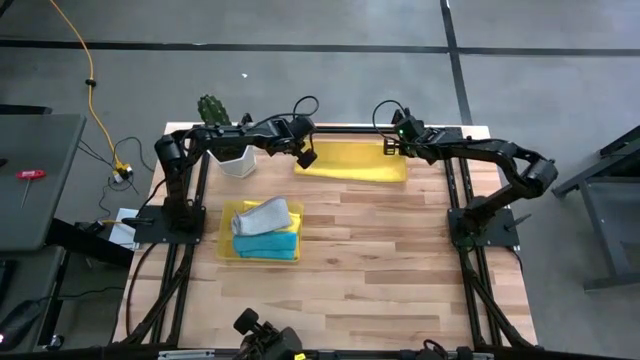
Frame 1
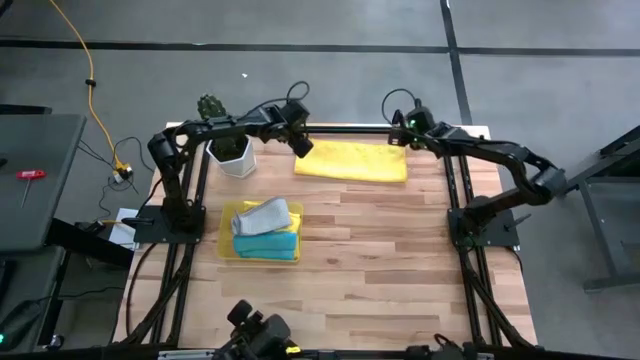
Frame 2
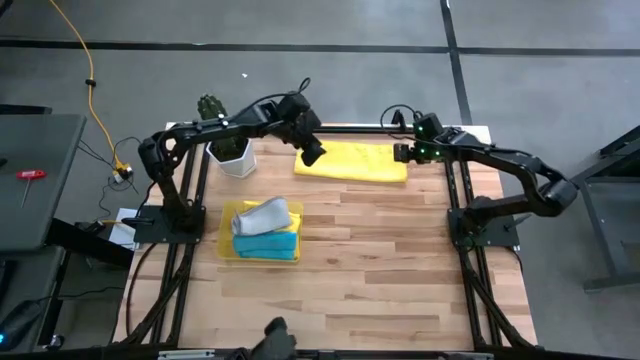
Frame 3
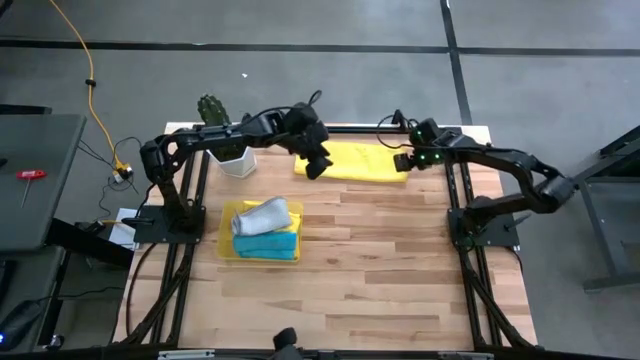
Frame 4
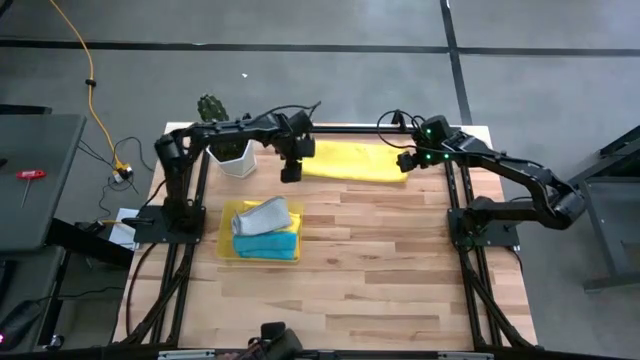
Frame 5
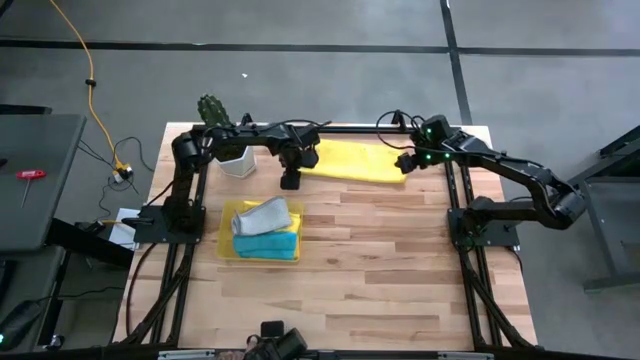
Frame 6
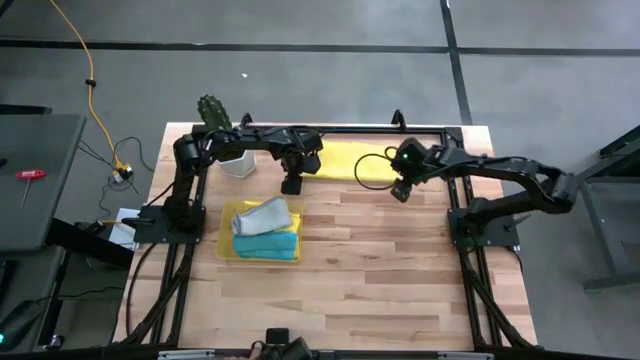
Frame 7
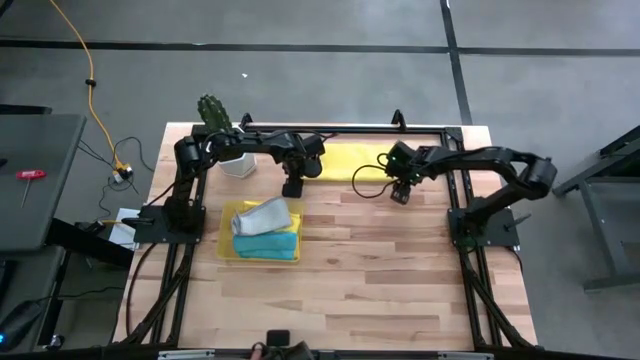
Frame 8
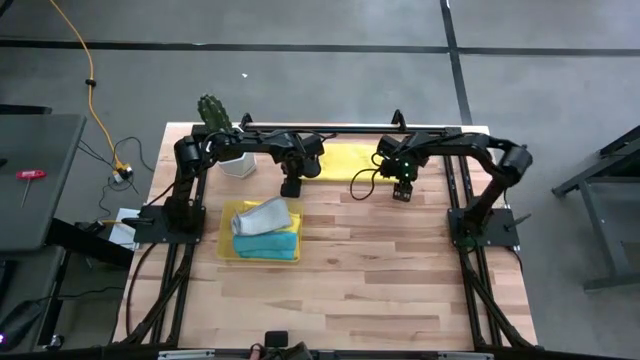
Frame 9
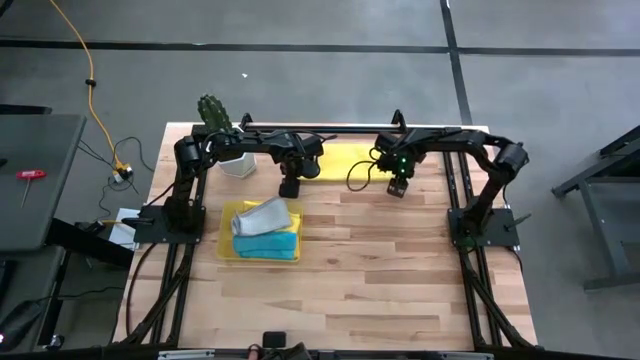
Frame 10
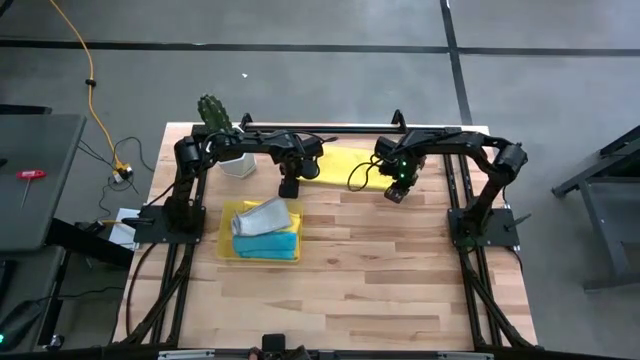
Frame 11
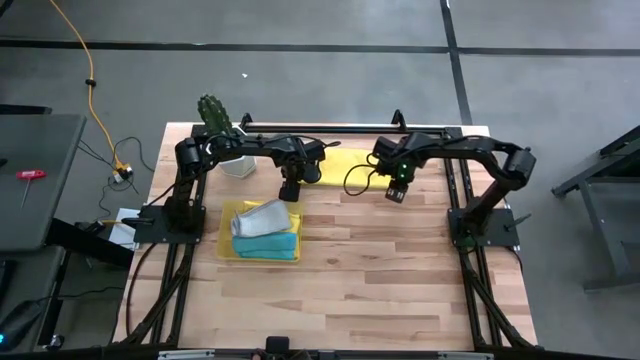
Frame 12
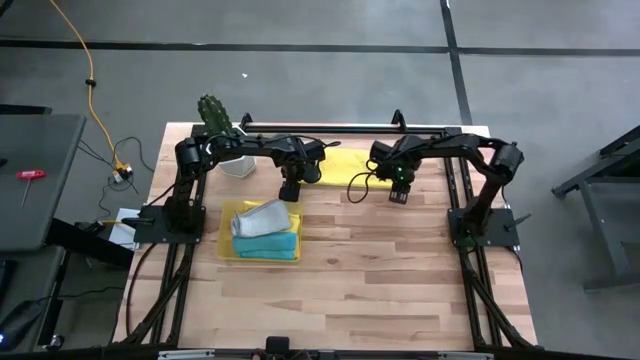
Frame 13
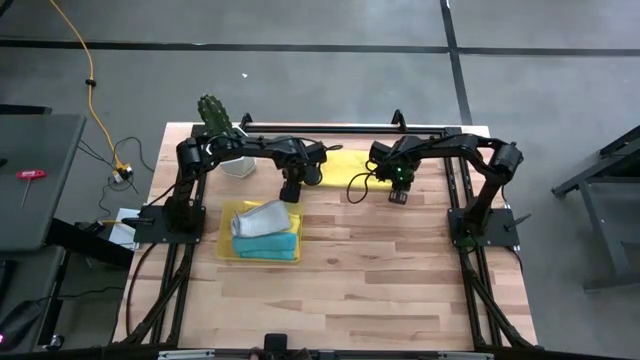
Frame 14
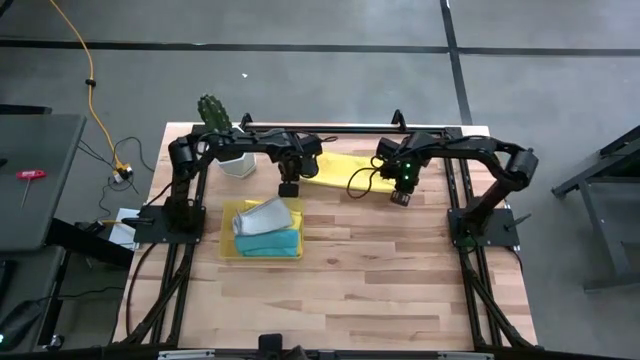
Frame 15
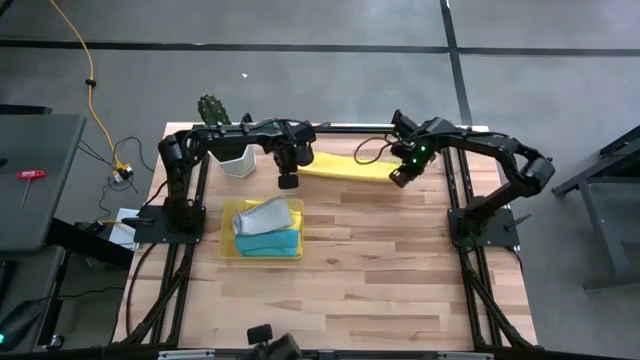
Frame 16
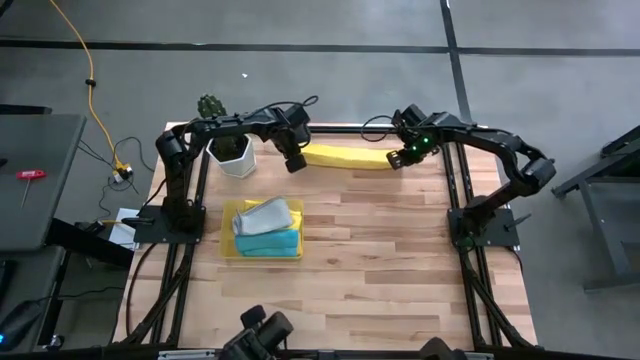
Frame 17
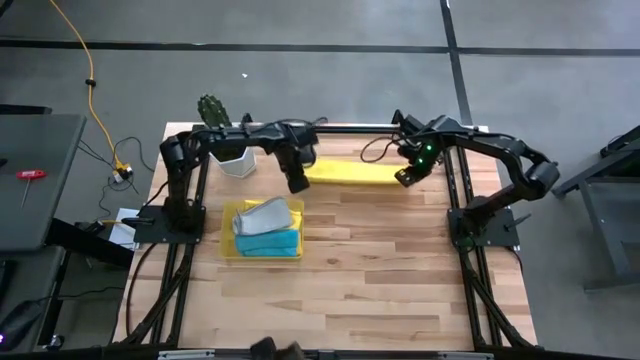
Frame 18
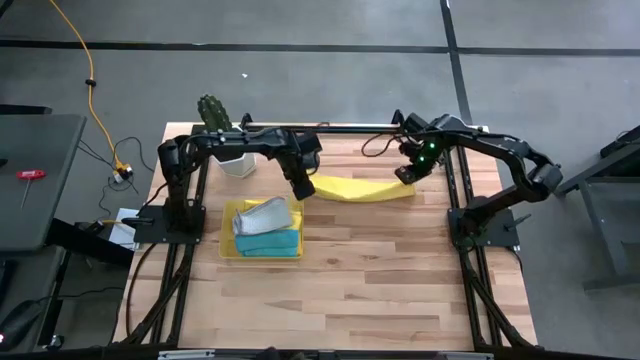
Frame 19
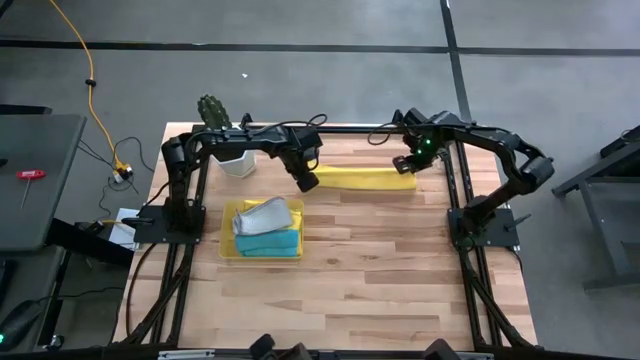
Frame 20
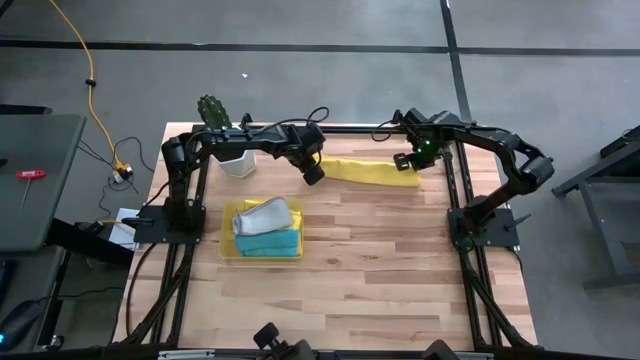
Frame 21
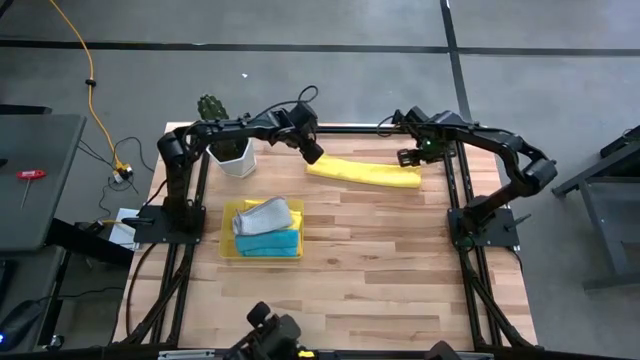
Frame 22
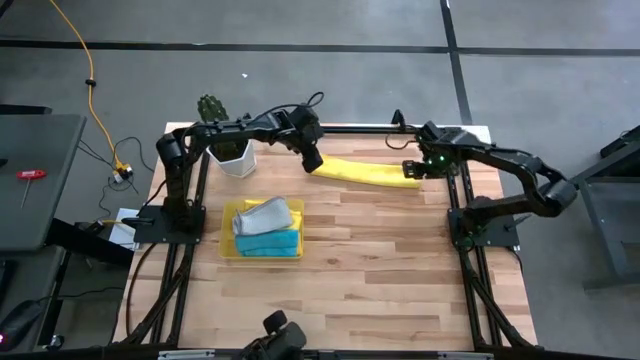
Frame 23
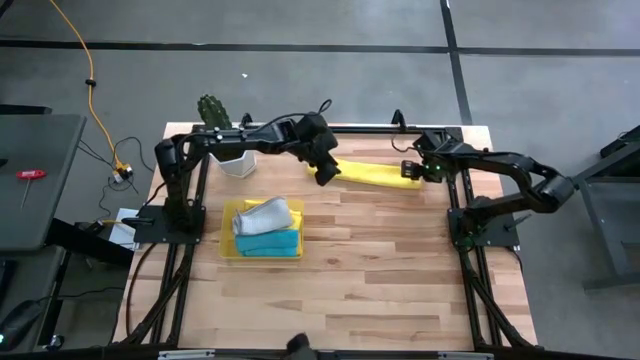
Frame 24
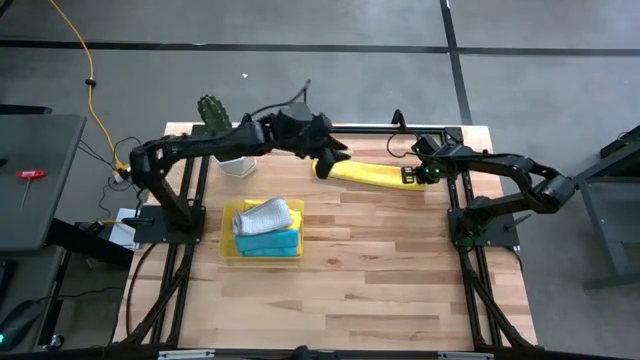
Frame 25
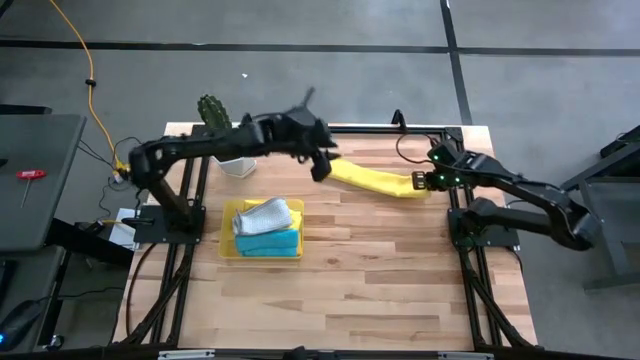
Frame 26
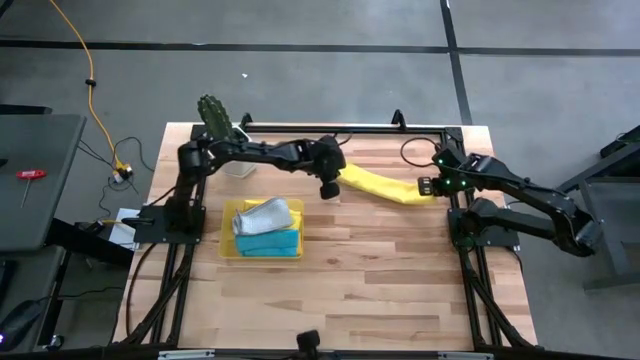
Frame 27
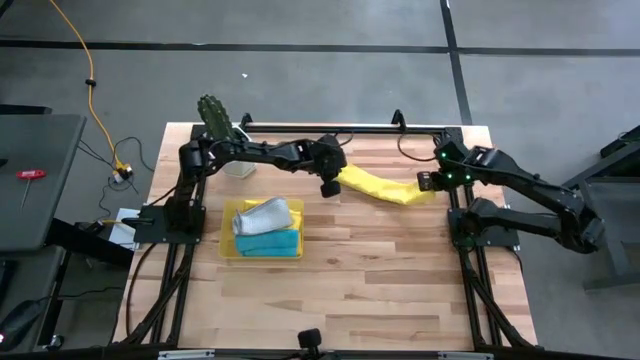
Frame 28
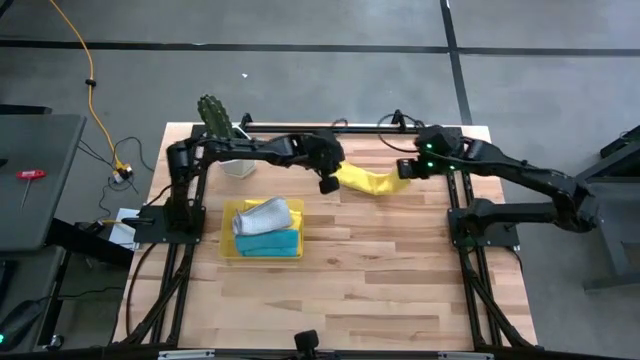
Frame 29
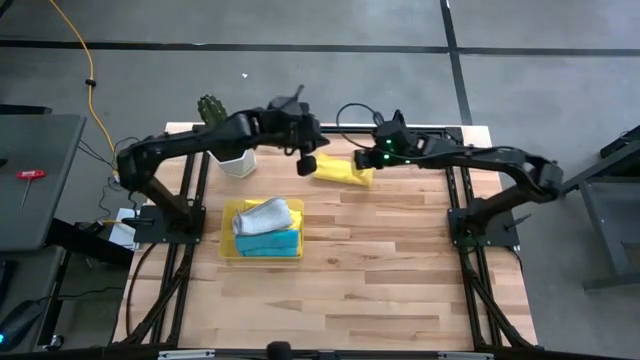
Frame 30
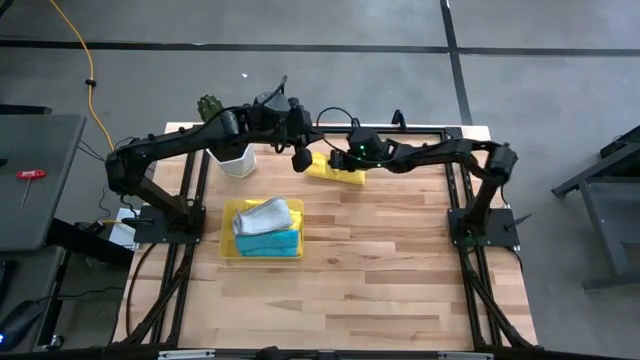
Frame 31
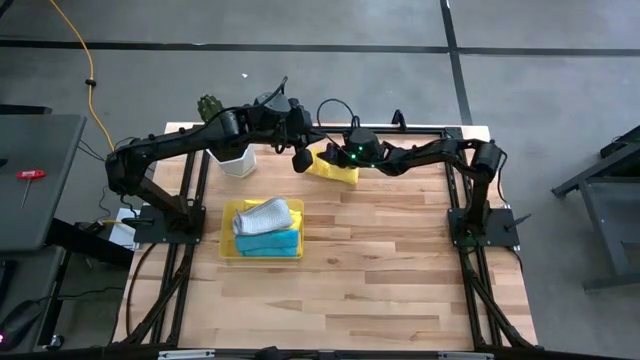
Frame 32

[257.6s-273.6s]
Task: Fold microfiber towels
Fold the yellow microfiber towel

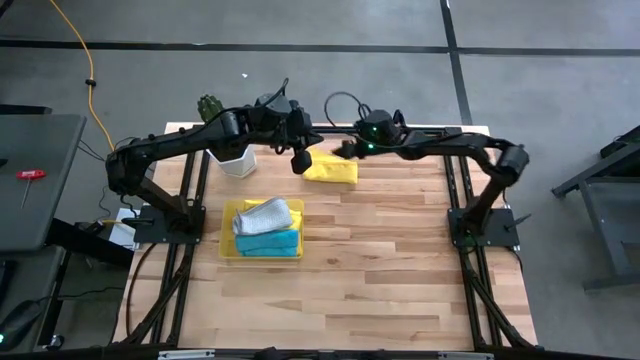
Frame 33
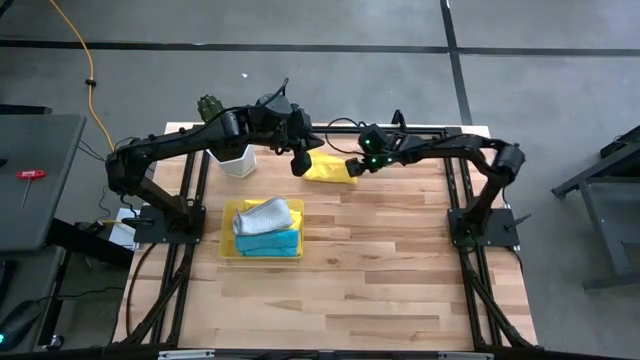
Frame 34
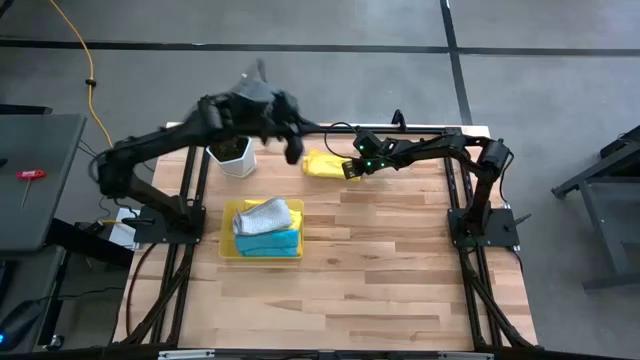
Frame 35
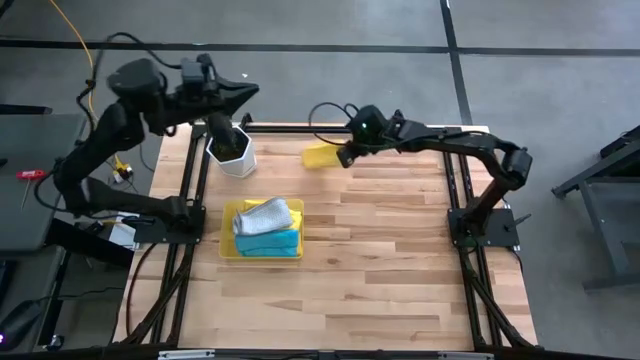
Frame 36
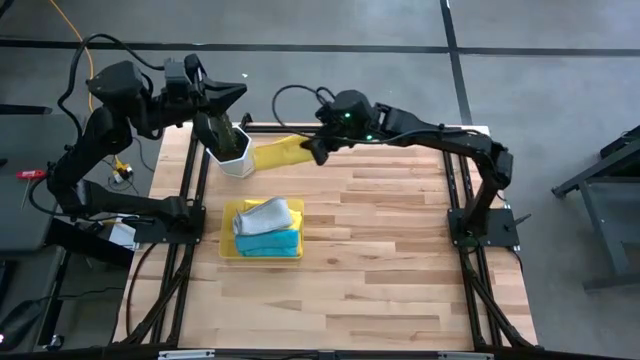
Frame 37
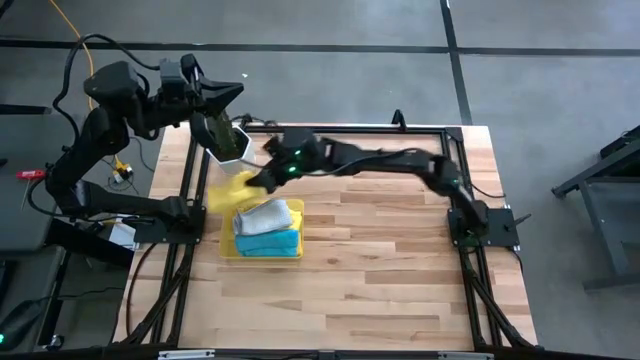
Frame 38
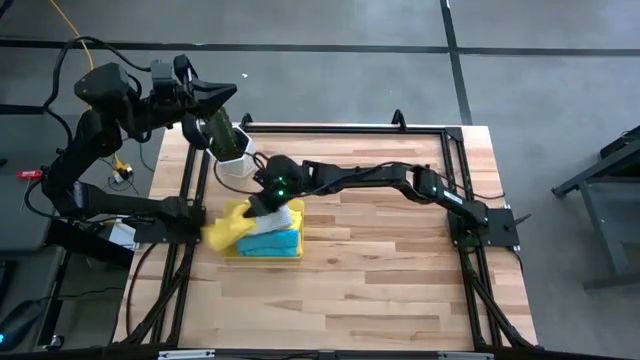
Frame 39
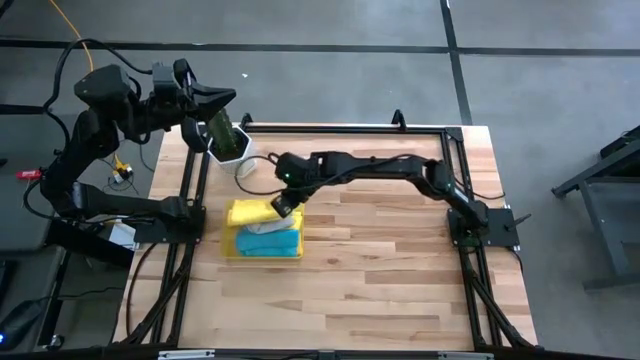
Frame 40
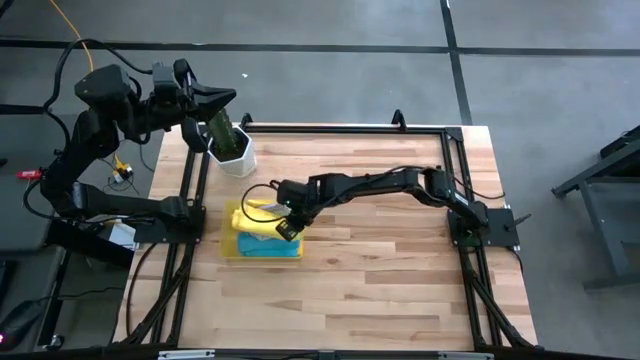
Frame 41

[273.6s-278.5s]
Put the yellow microfiber towel into the yellow bin

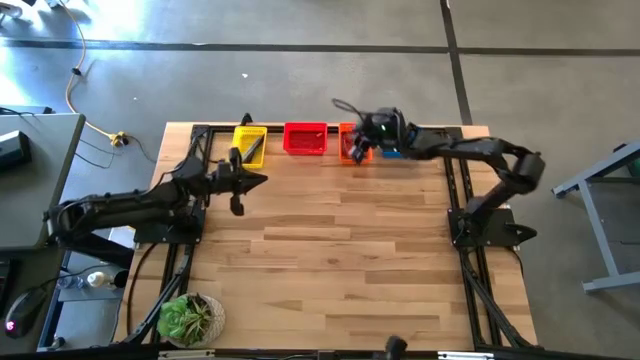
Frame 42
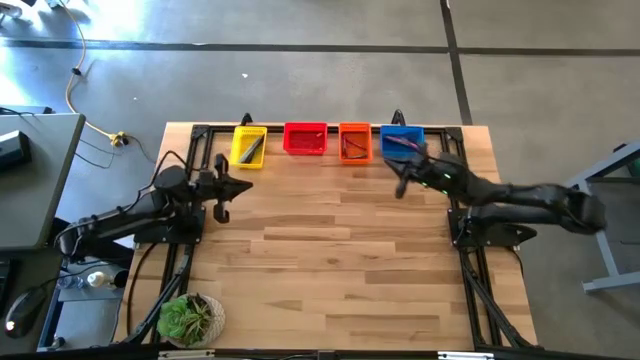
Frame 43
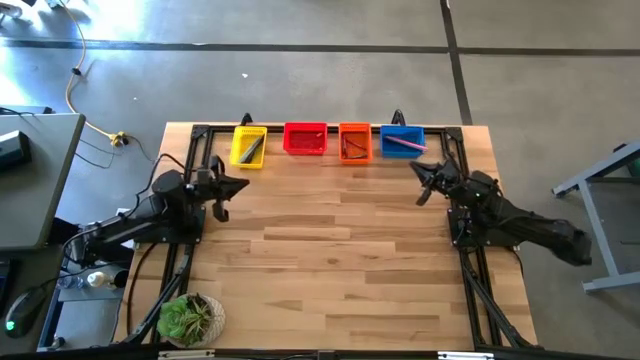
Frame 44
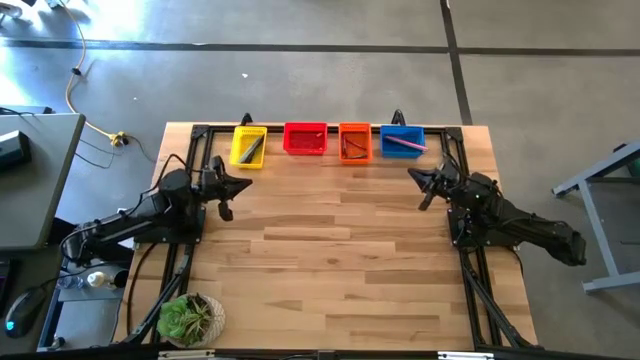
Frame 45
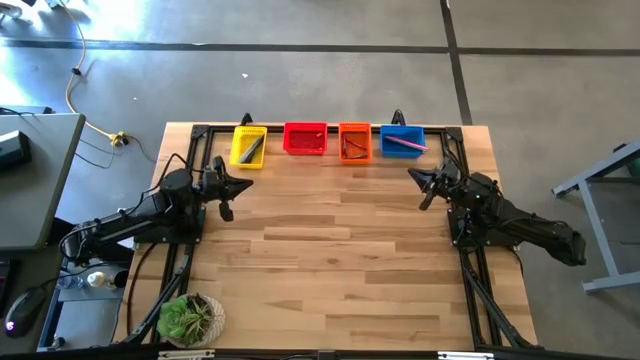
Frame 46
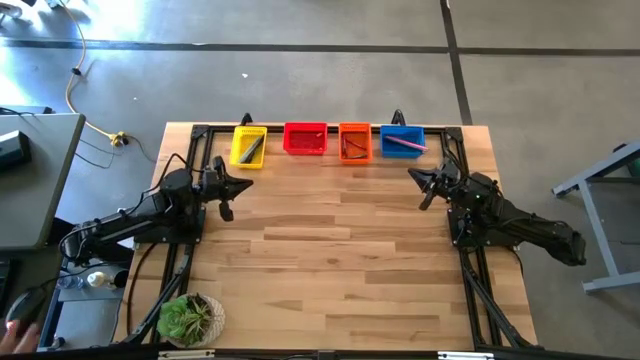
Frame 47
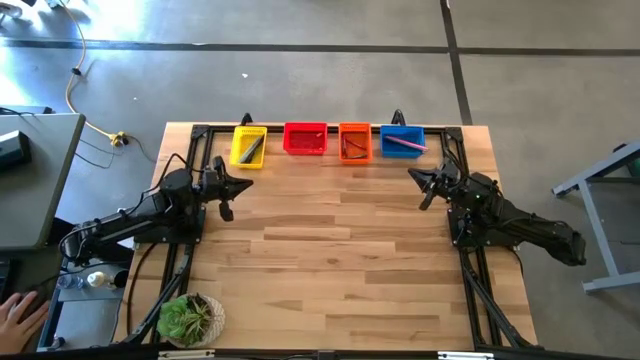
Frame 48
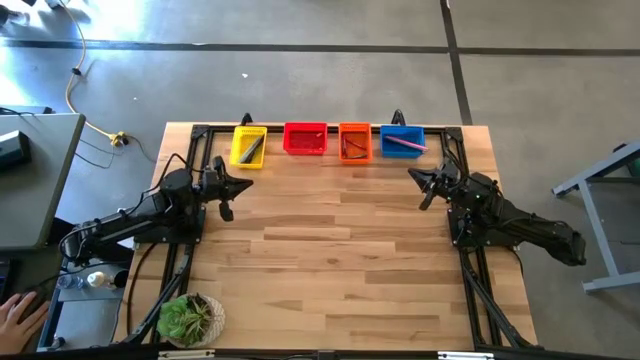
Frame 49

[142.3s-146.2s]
Task: Sort crayons/erasers/pens/pencils in bins
Return to Home Position
